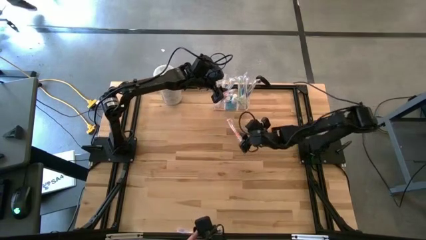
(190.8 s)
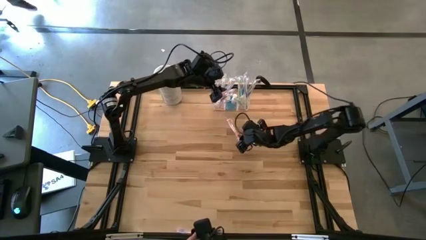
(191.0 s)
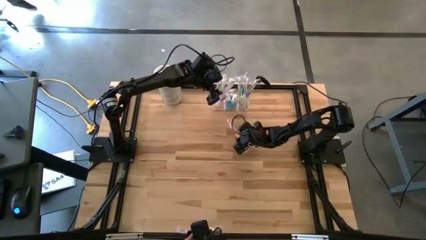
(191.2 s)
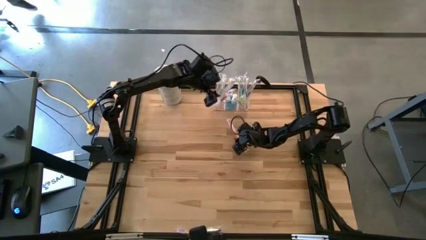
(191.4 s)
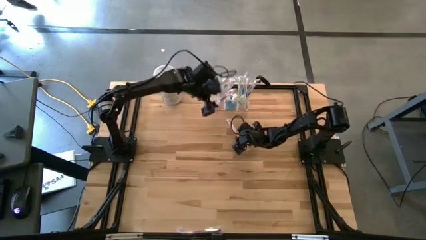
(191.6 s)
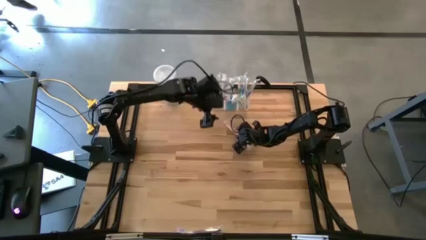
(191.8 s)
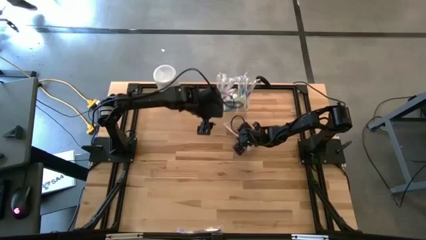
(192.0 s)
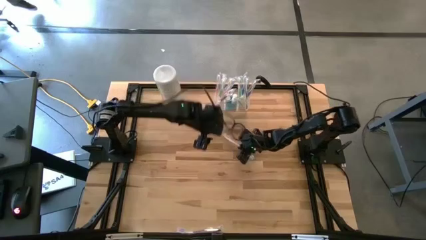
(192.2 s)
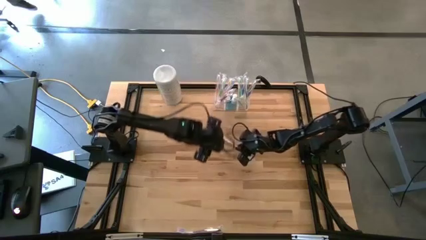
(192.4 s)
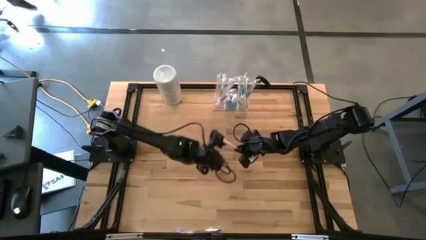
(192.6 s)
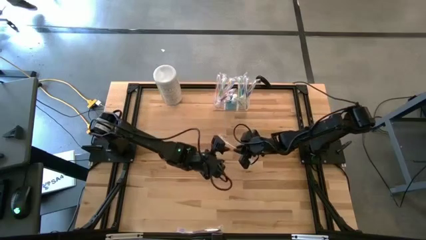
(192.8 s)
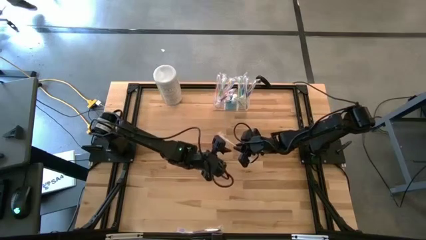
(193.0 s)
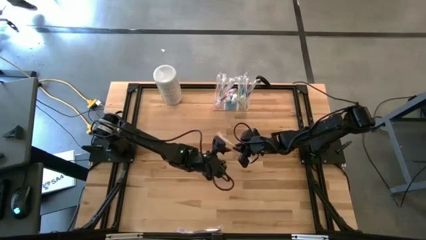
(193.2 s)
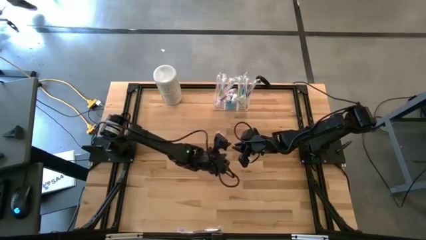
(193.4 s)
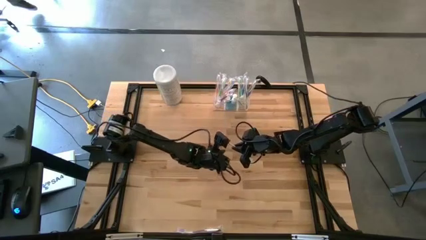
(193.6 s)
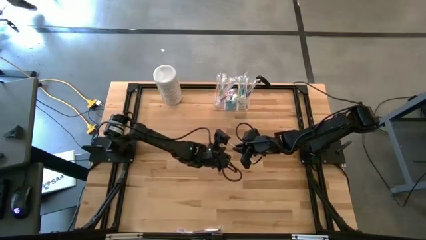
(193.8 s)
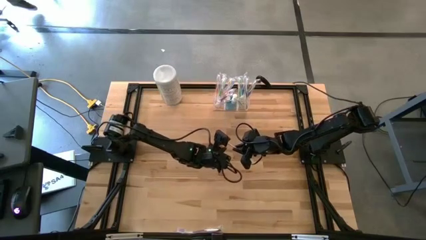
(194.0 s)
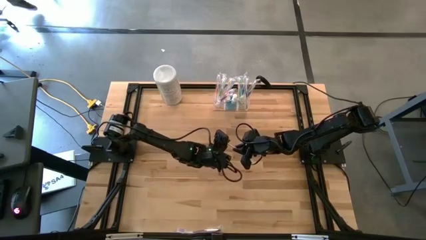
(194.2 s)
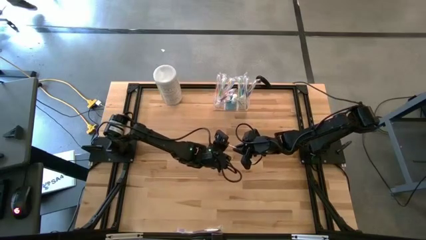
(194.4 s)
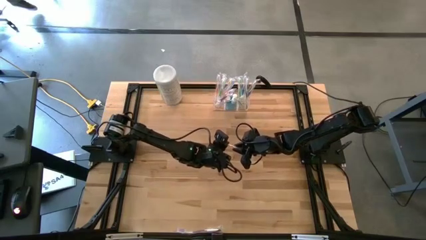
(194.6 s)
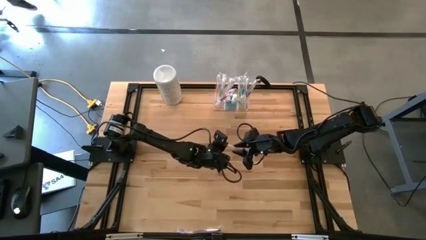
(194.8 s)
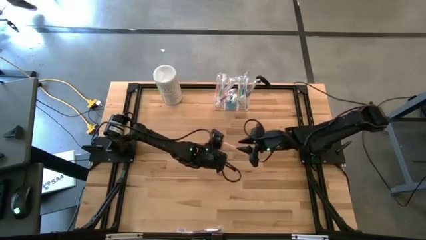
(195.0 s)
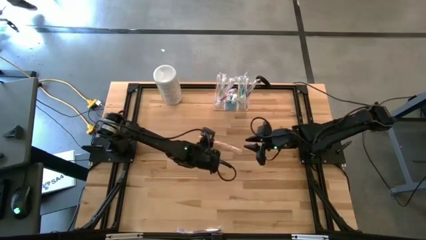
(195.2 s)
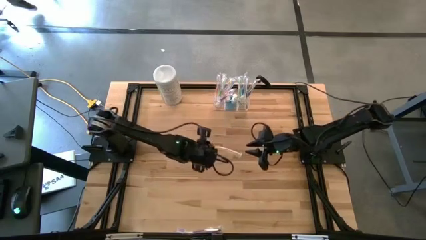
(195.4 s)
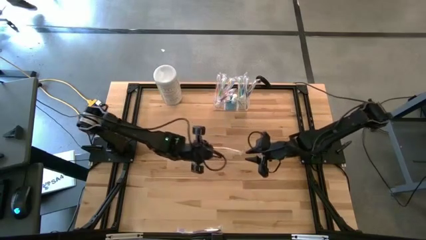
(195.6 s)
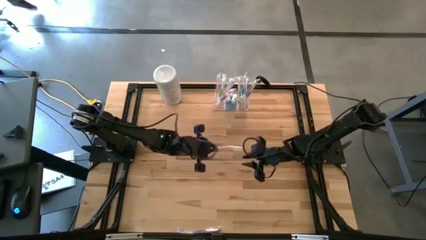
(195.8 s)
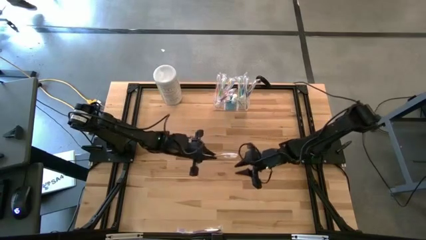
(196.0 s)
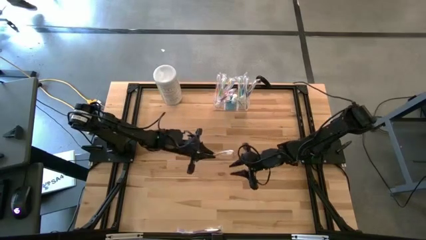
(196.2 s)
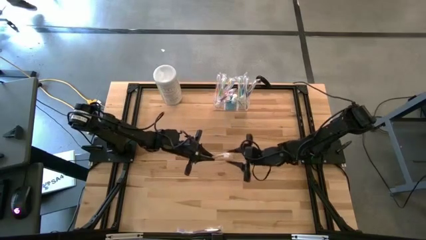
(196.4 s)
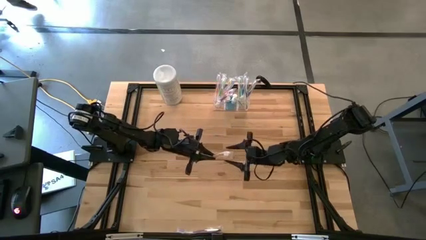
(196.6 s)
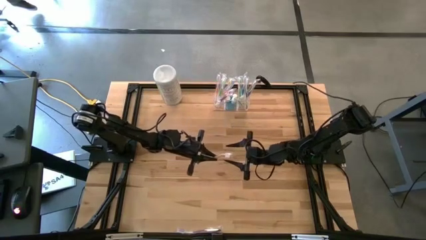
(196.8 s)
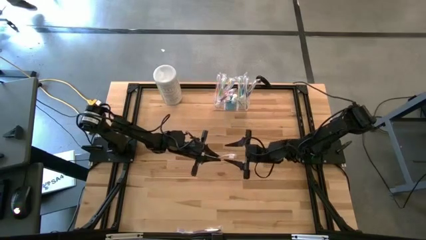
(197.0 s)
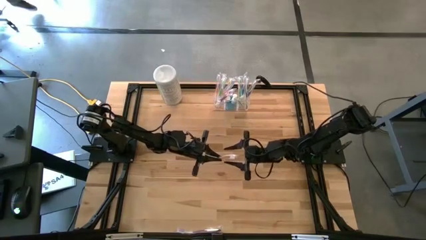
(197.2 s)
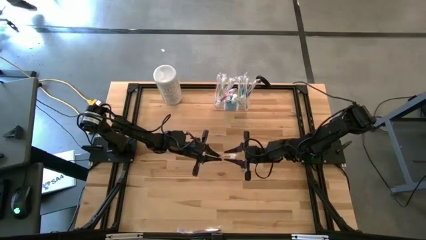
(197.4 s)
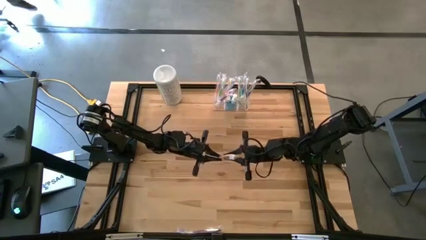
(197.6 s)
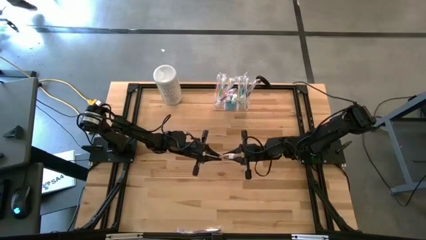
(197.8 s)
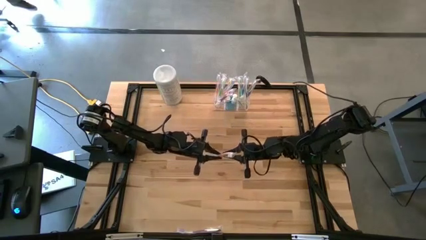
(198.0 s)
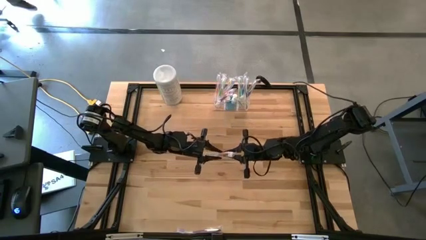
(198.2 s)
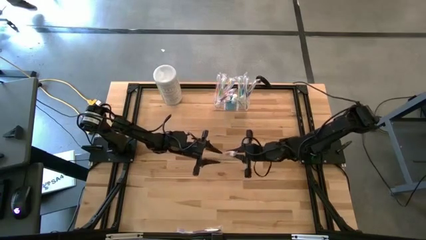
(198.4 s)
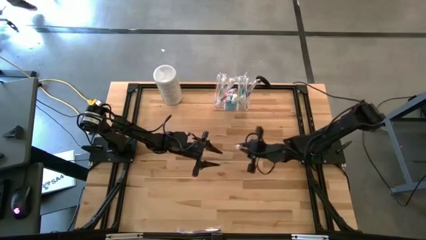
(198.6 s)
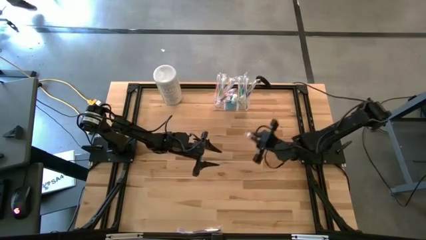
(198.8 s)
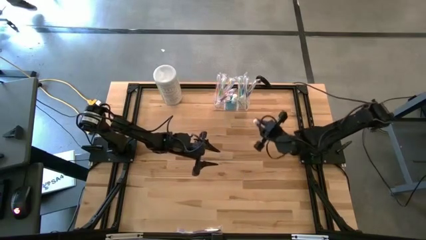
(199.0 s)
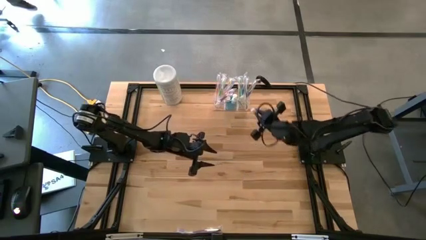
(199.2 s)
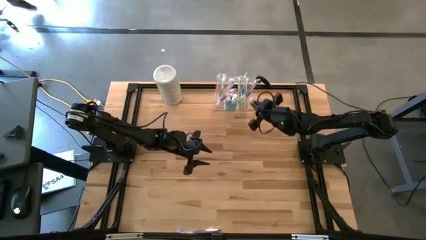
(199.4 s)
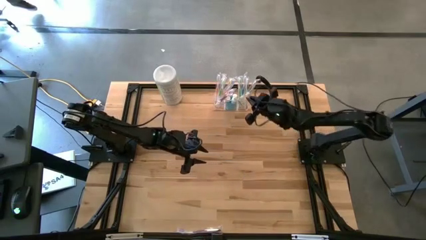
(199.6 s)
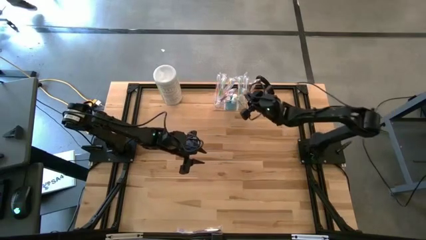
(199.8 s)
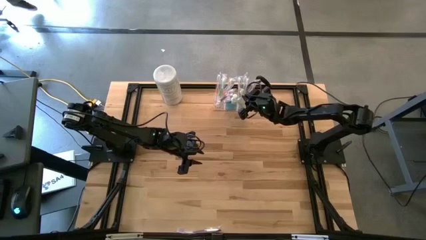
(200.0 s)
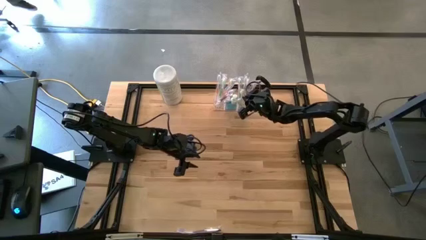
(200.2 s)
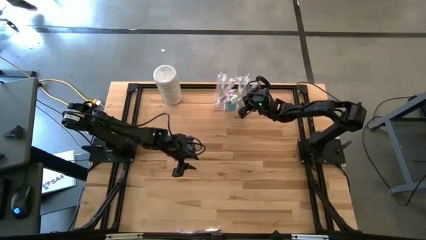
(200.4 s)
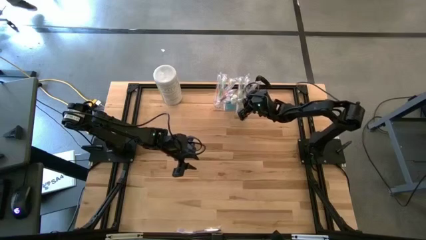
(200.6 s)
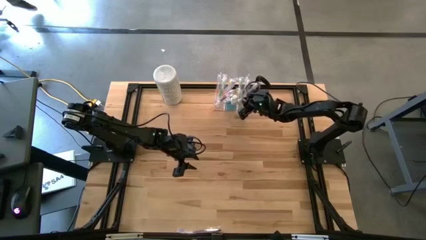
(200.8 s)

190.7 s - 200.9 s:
Task: Pick & Place toothbrushing station
Put the orange toothbrush into the transparent organizer

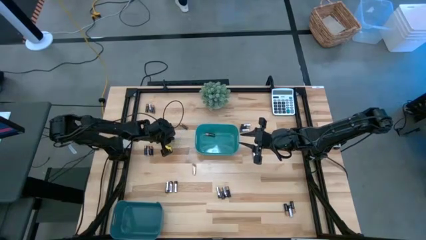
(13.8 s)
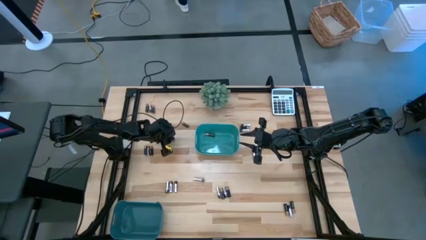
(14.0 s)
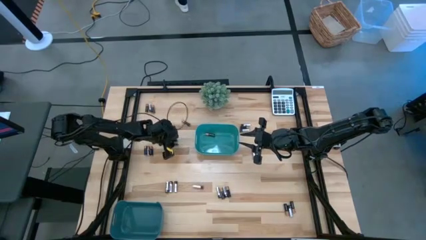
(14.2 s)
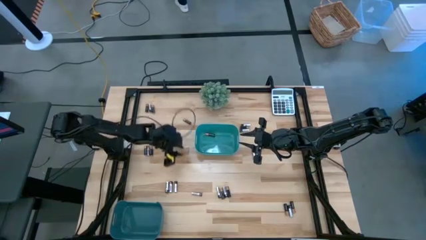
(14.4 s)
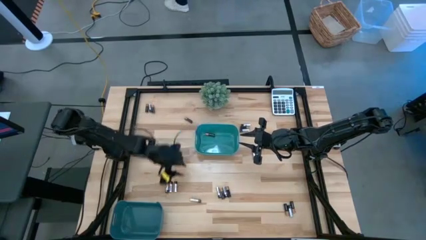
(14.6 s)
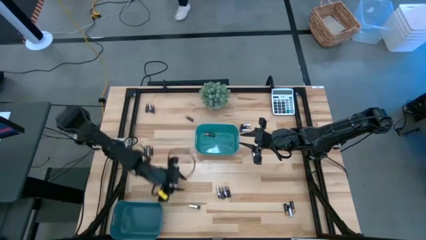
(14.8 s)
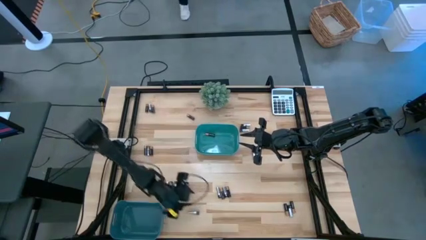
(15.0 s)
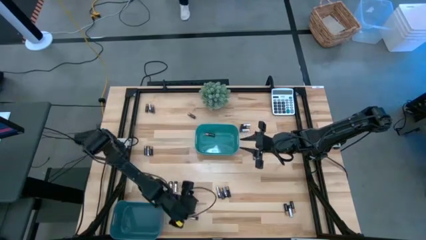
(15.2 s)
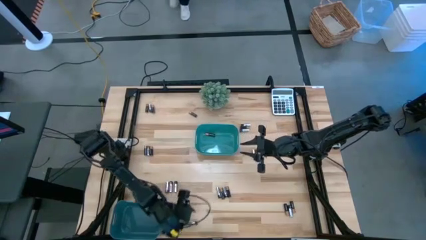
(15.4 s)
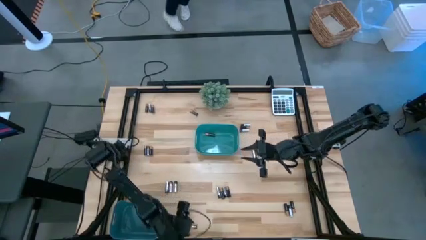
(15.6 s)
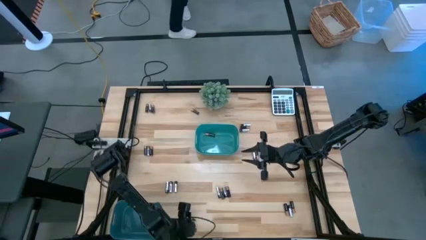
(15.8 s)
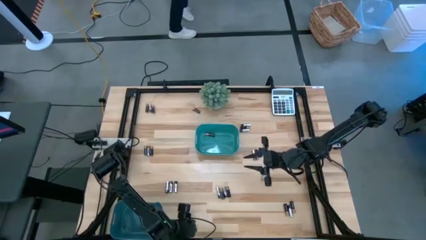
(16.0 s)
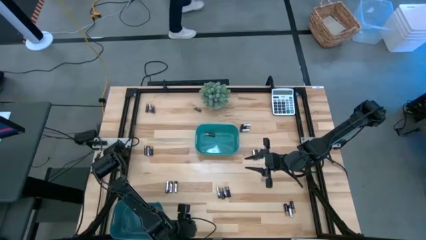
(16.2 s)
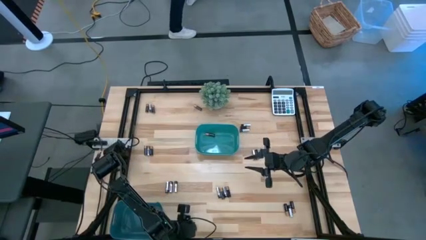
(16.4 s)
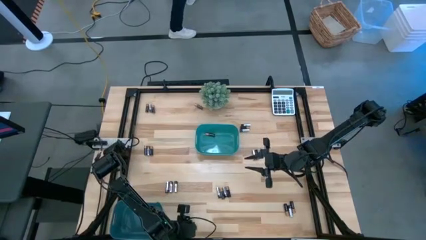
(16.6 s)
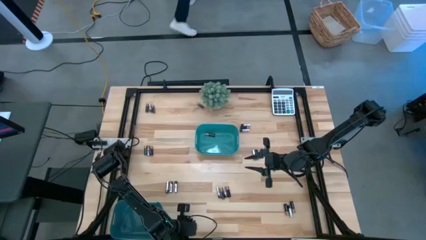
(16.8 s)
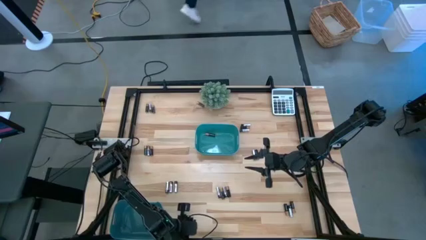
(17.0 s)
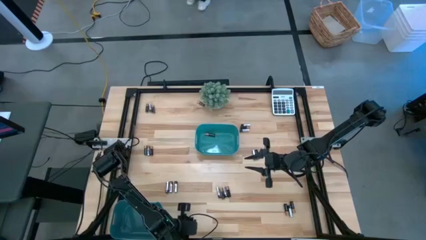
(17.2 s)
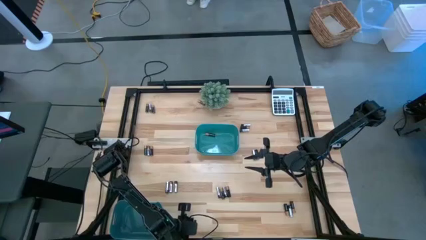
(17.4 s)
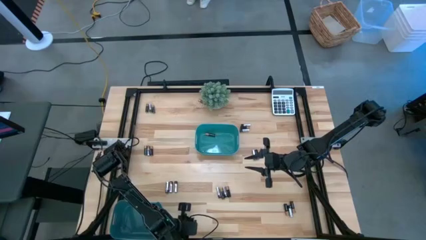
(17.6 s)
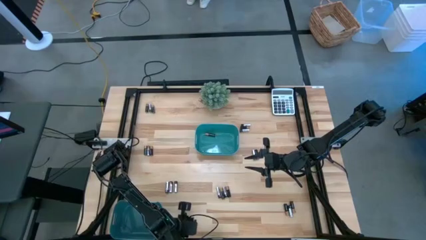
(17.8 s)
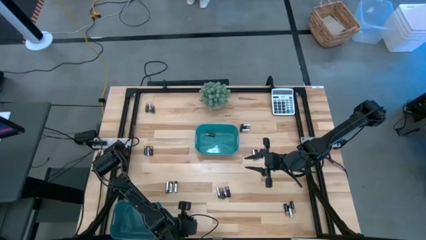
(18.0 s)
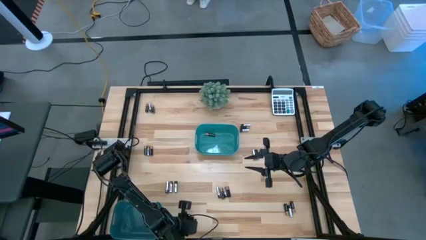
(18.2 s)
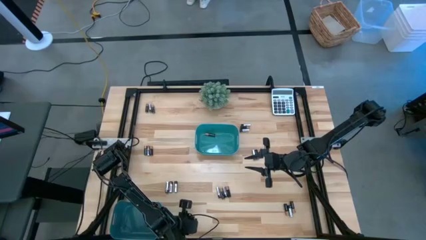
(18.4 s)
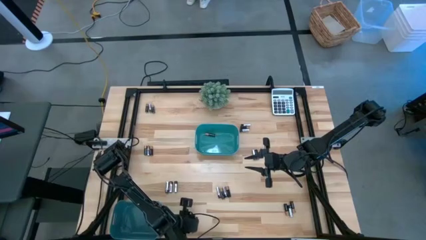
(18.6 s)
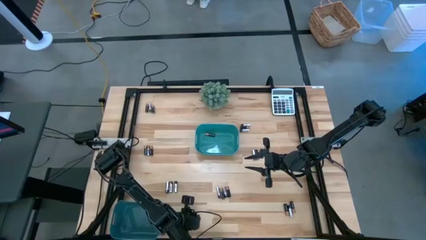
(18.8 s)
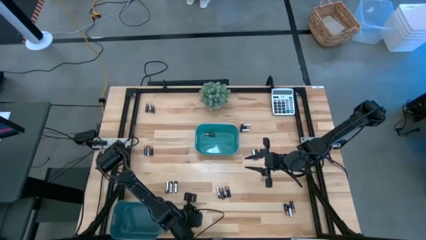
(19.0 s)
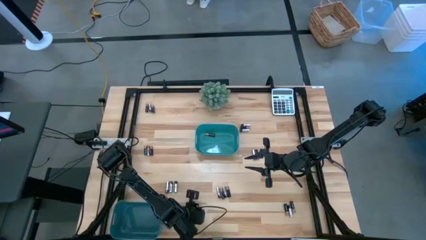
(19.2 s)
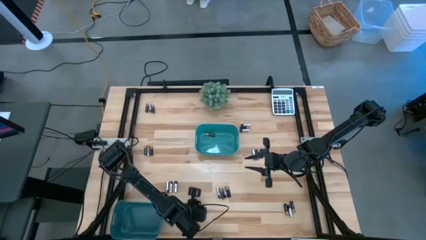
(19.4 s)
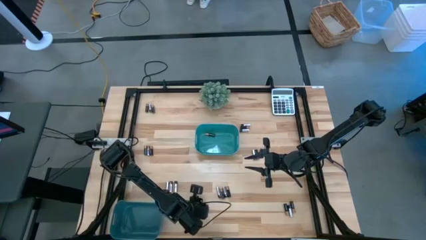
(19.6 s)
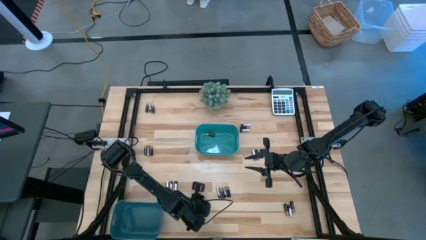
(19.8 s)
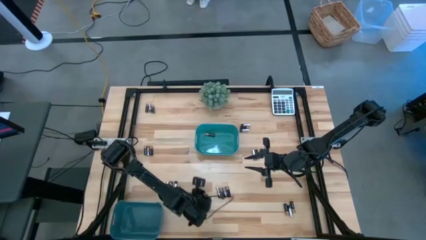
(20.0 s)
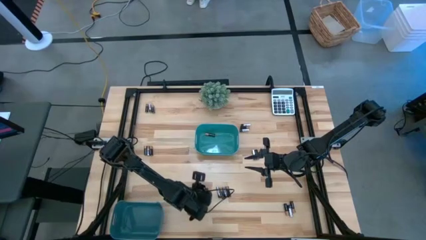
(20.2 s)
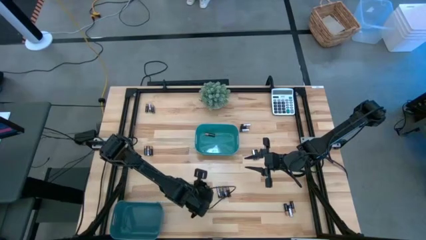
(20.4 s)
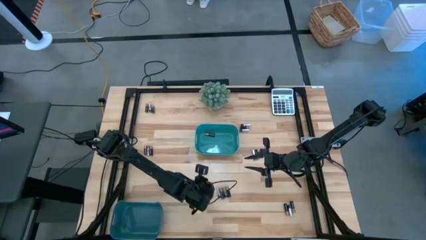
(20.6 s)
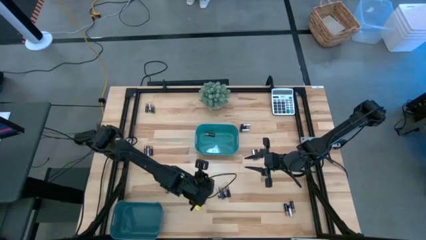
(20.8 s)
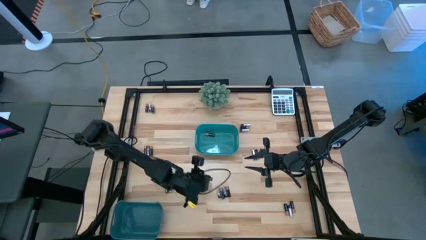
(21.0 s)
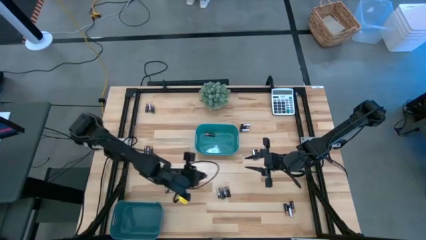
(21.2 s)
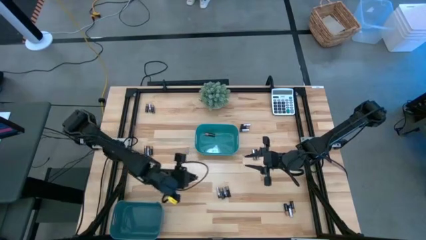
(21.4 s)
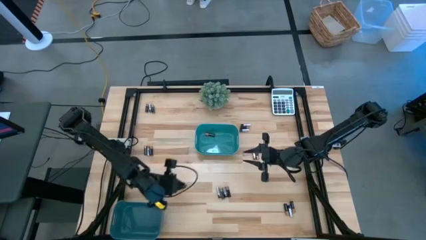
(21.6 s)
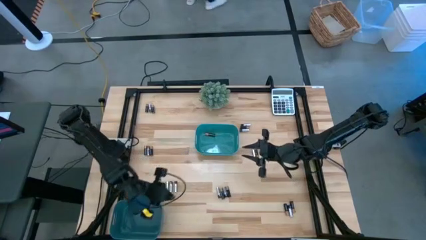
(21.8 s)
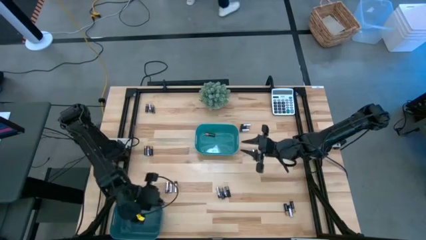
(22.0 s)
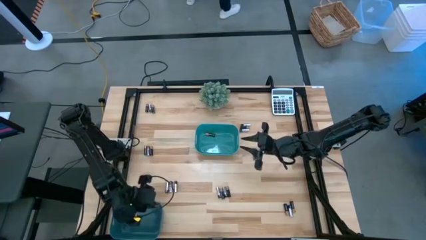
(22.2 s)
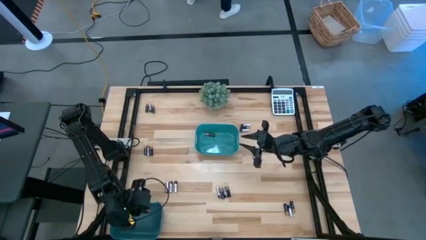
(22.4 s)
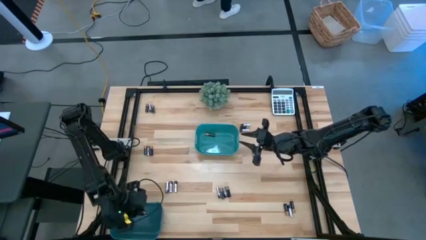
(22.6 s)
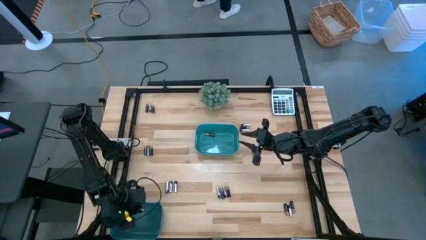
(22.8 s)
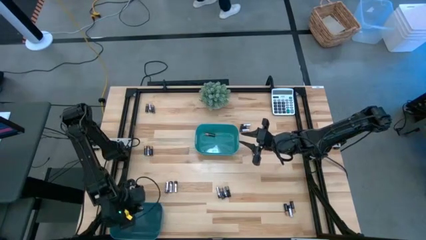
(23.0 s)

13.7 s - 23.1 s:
Task: Sort batteries
Put the silver battery into the blue bin
